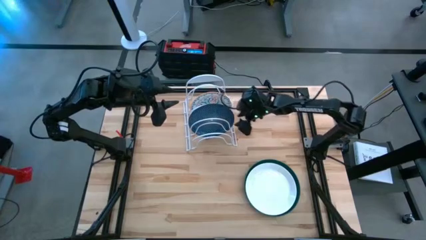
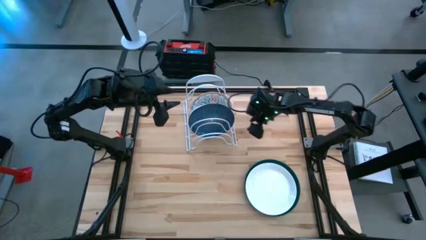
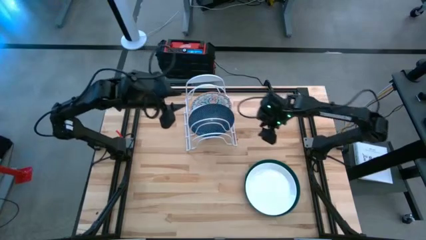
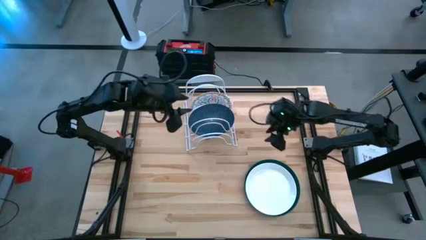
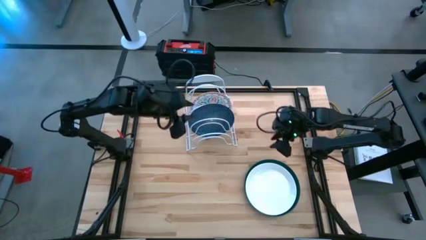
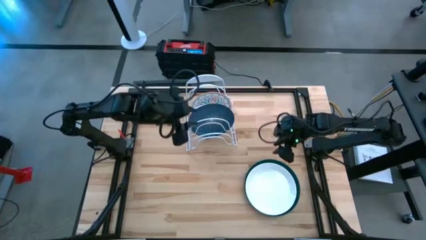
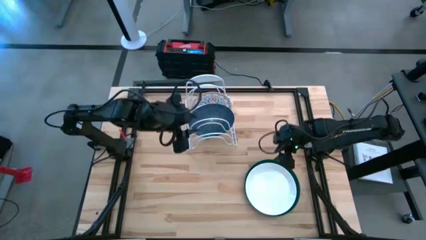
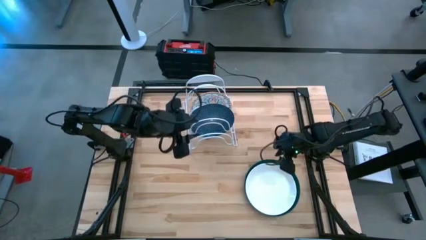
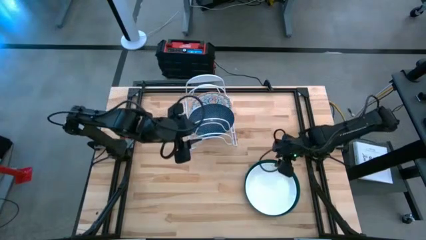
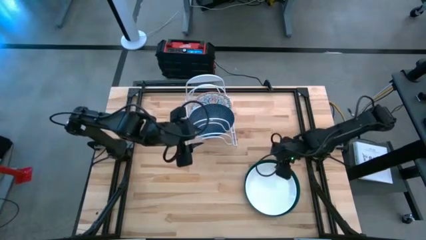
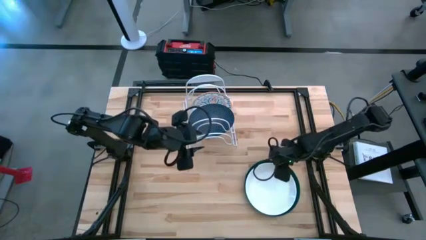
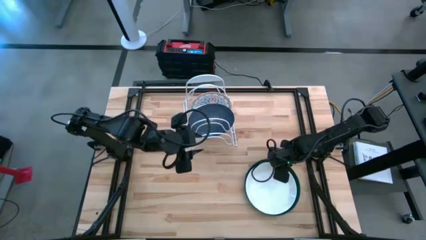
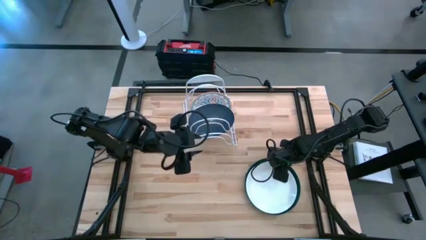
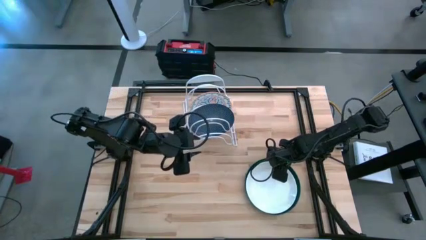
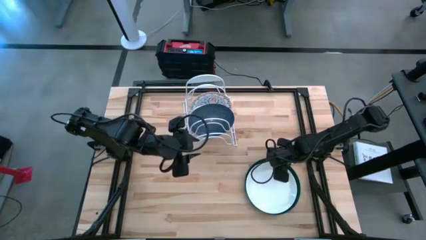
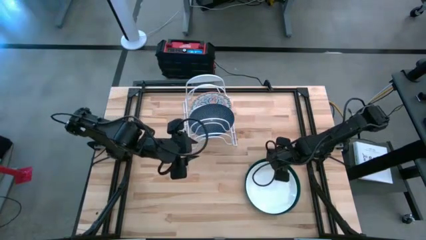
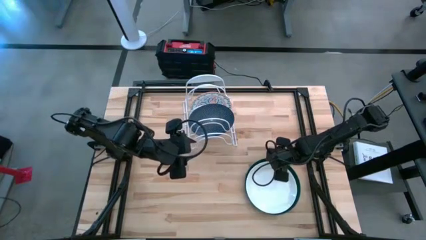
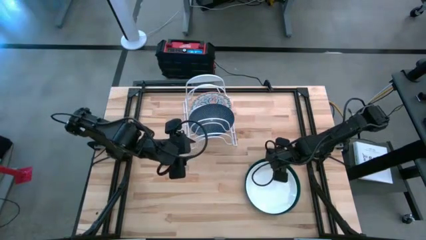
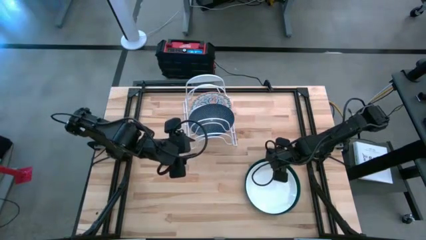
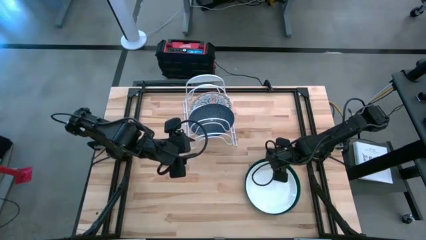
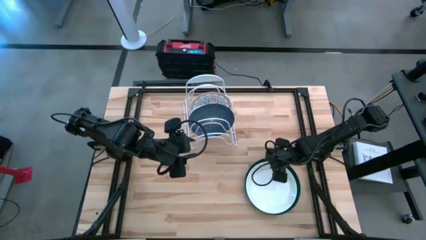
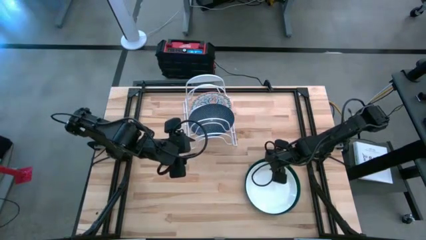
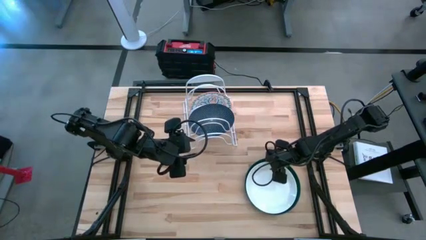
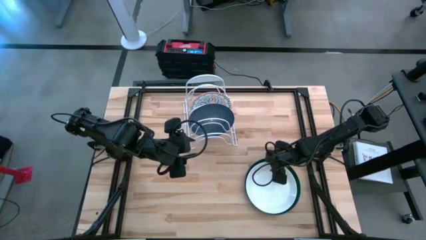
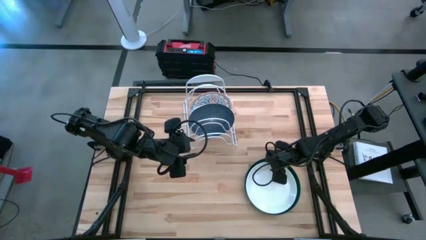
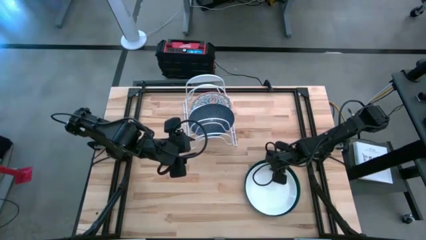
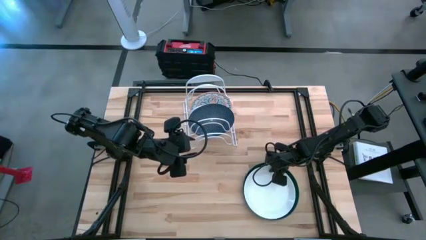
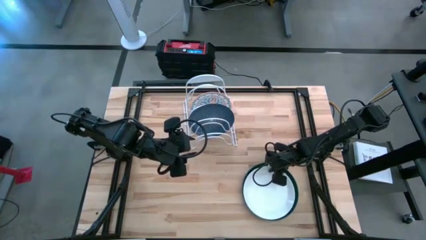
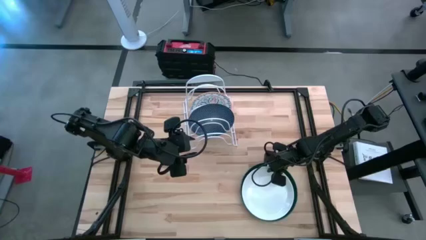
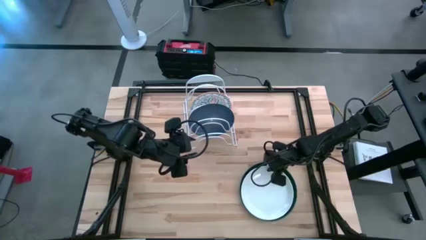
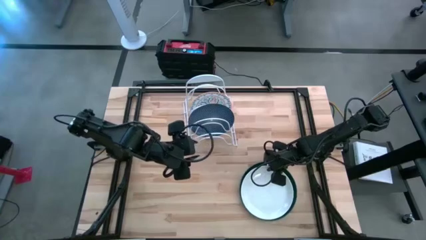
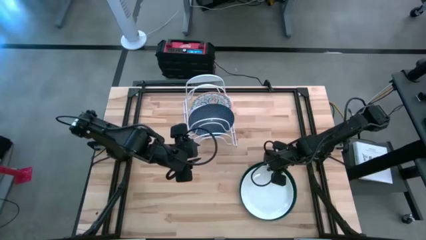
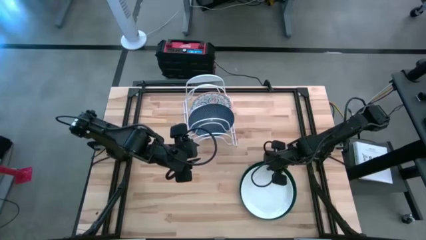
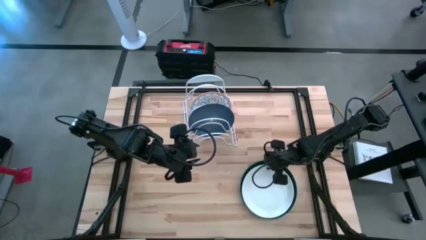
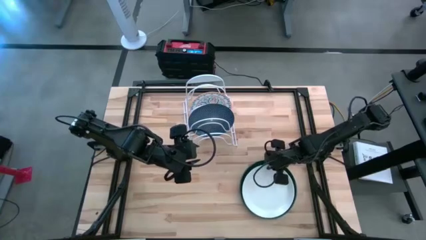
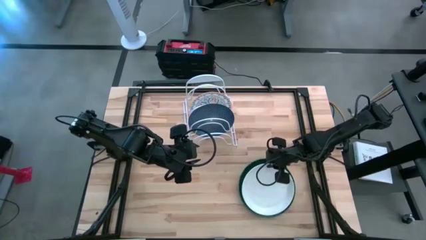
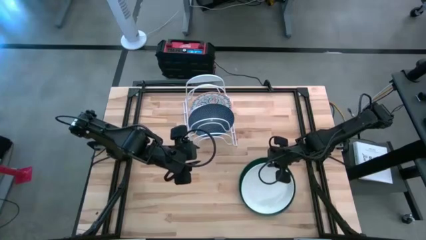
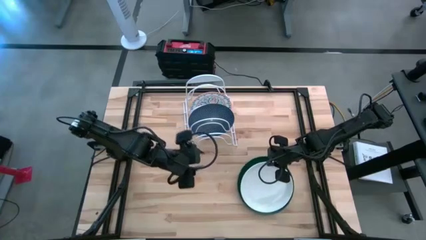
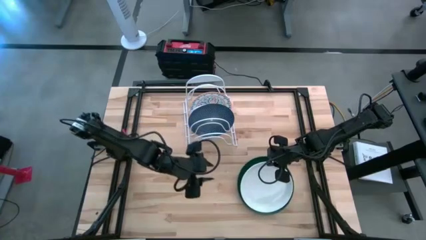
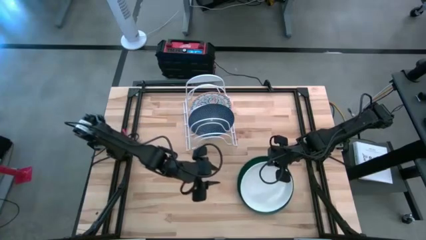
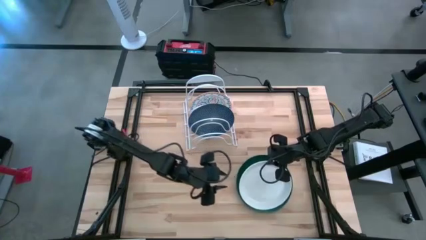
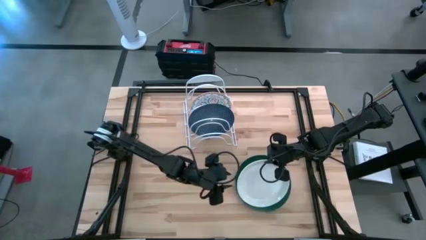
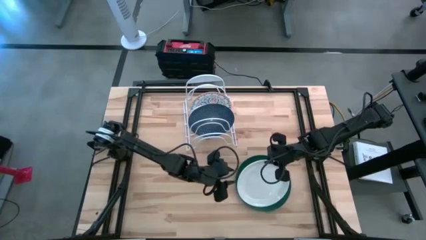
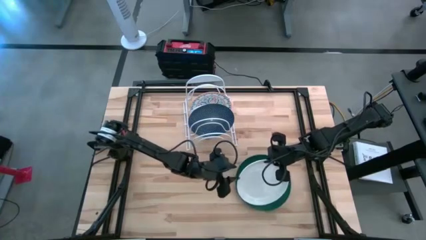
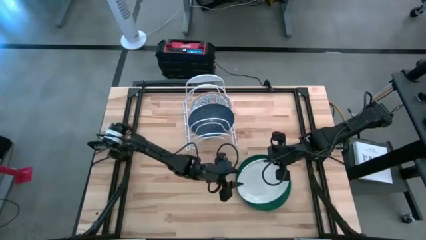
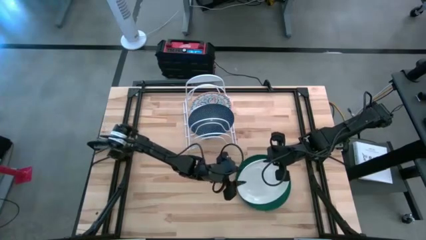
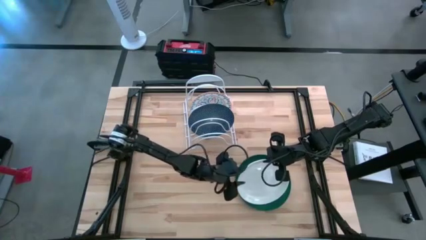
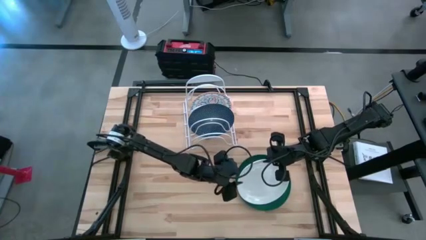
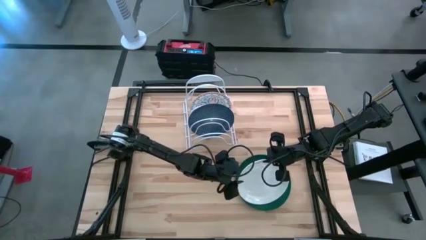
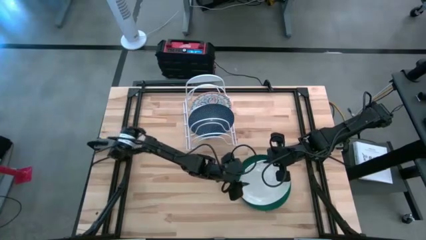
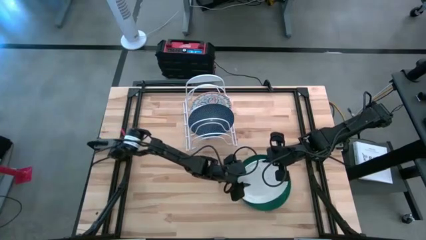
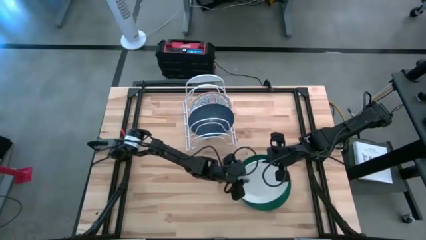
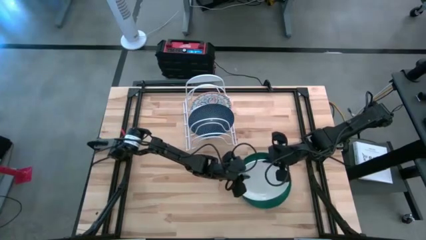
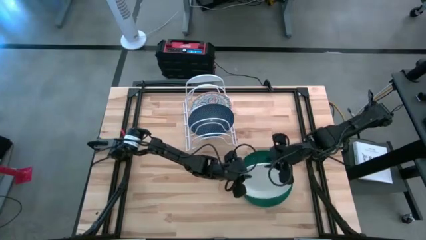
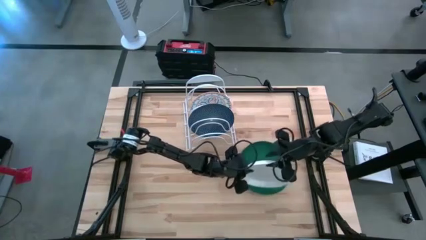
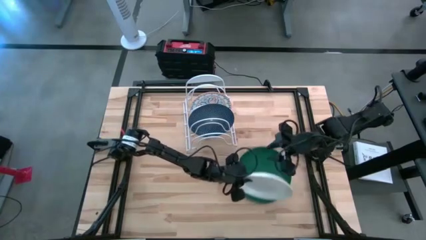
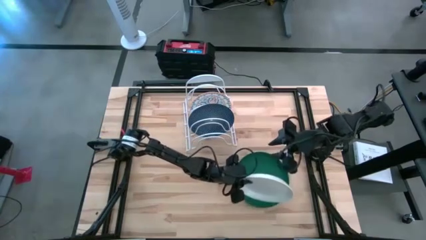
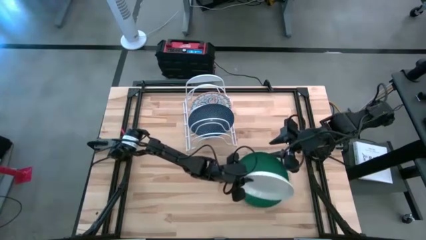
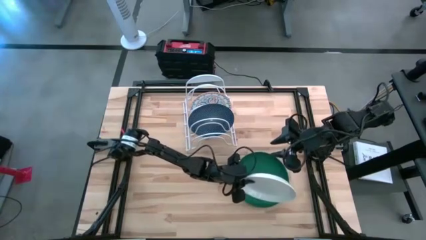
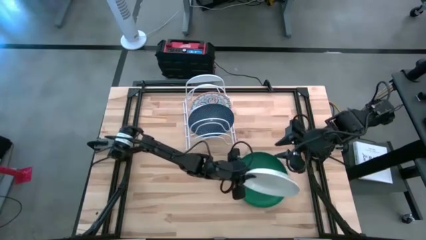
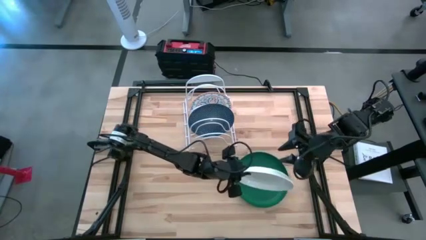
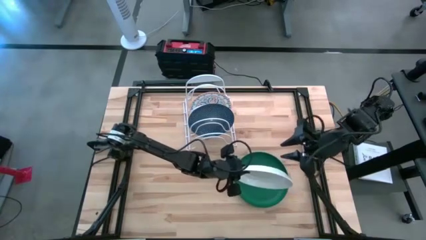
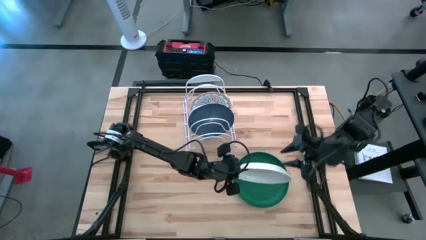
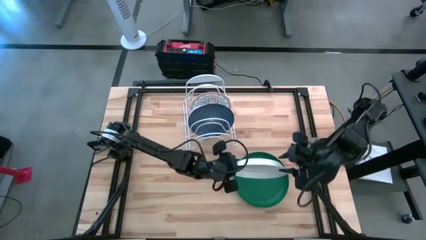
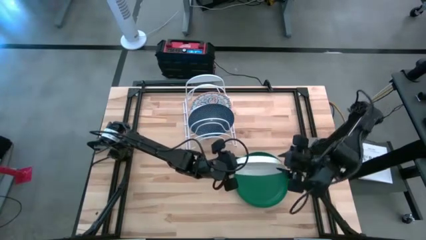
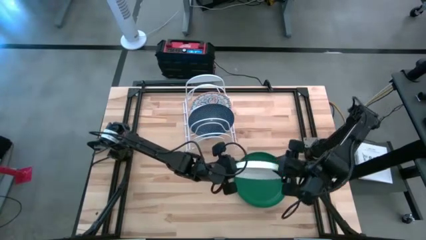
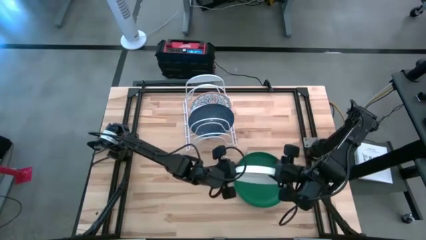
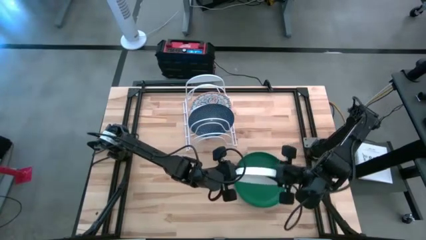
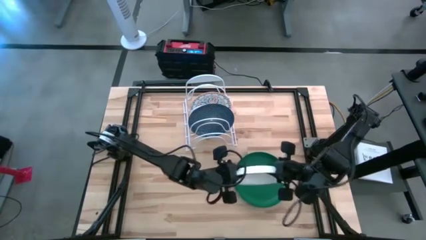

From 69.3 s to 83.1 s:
Task: Sort dishes
Put the white plate into the dish rack

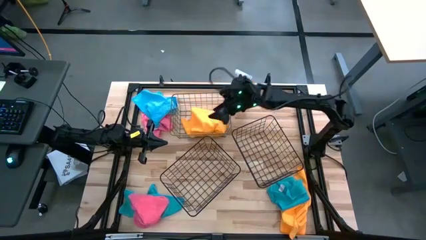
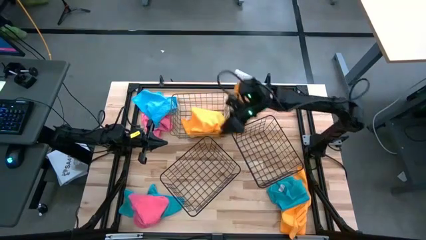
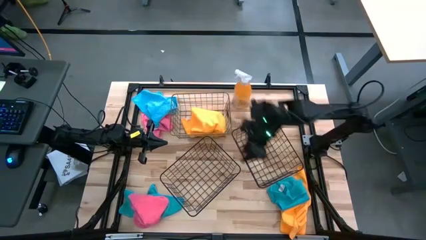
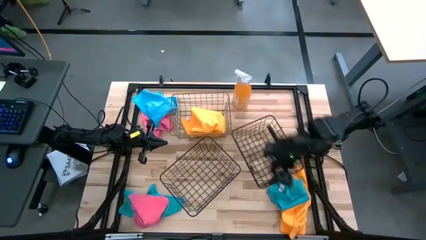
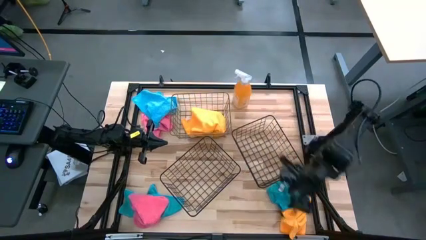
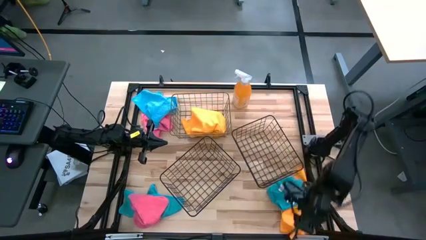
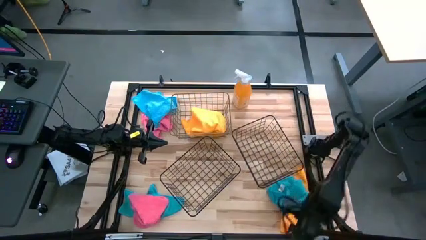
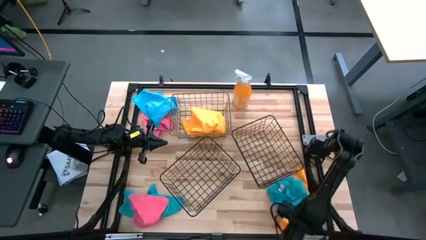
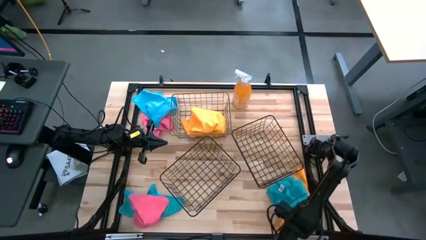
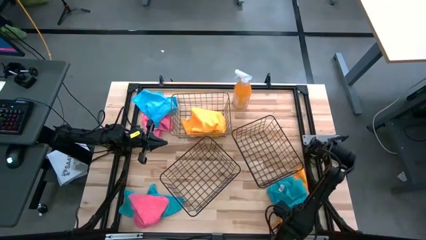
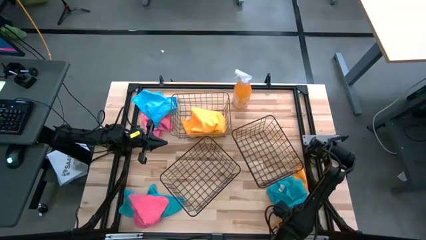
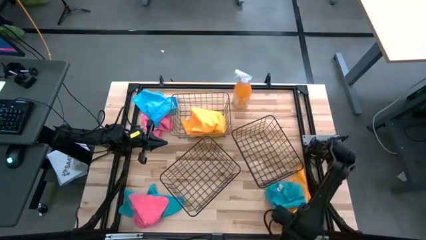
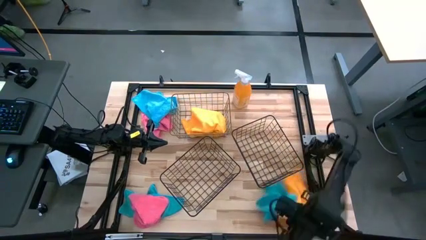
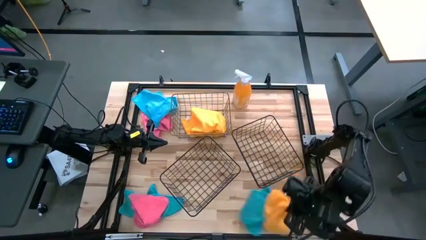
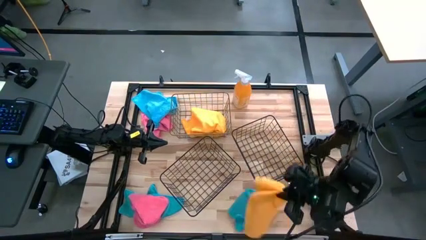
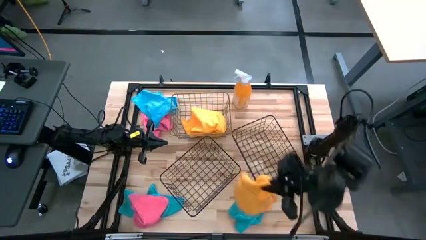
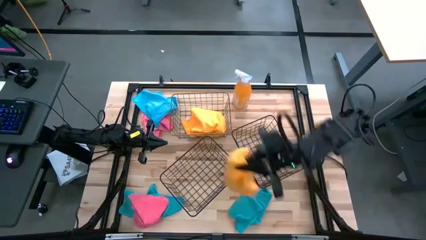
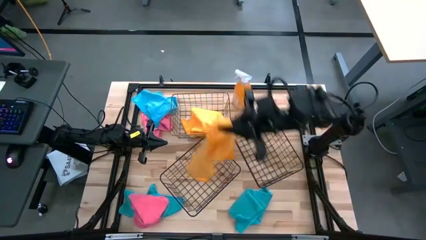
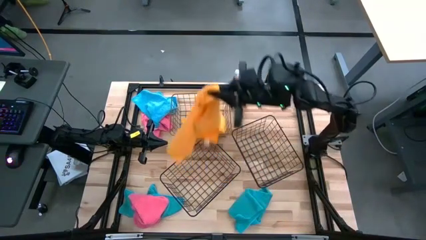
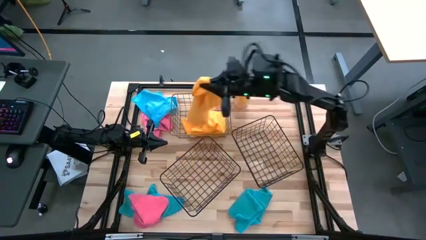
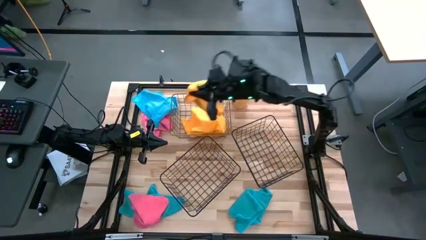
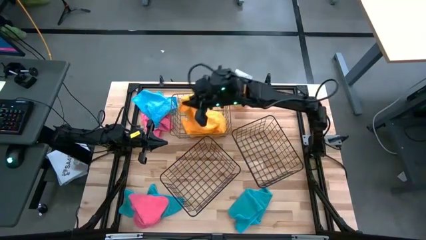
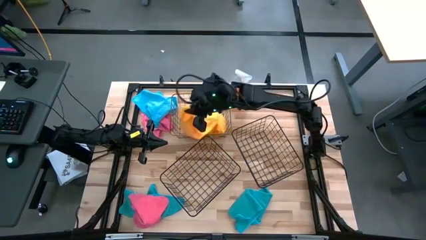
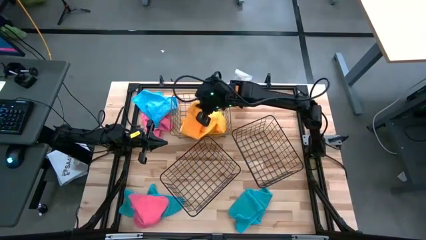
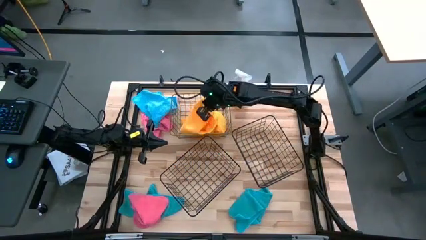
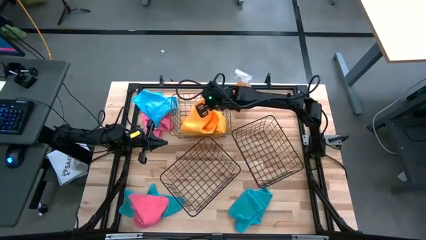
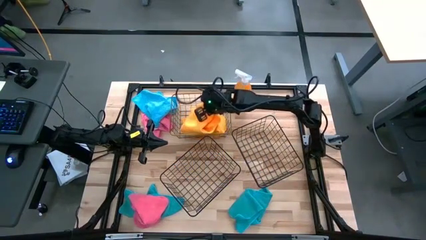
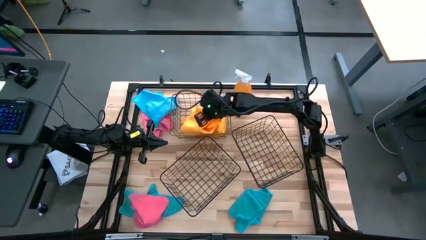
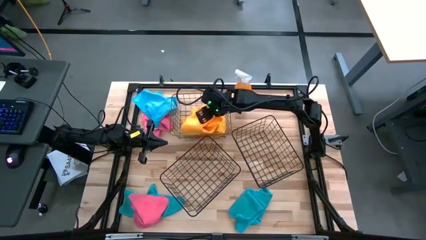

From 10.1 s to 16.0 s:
Task: Sort microfiber towel by color & place in baskets
Put the yellow microfiber cloth into the gold basket
